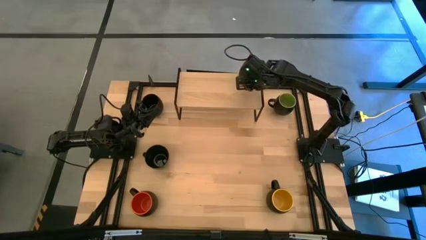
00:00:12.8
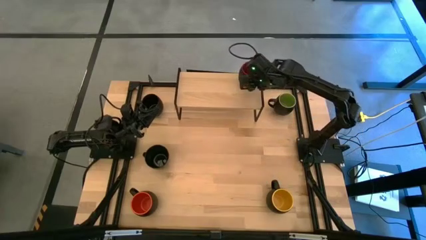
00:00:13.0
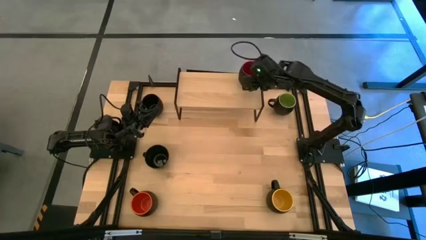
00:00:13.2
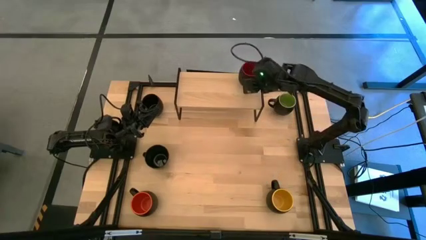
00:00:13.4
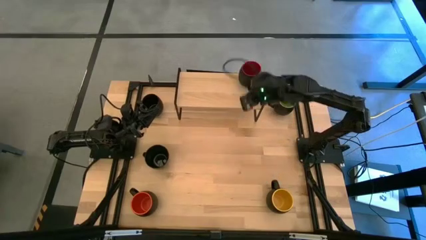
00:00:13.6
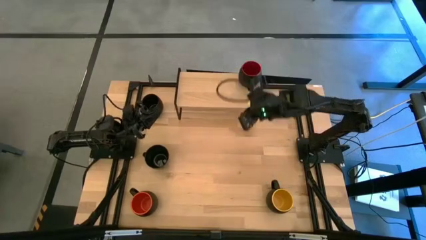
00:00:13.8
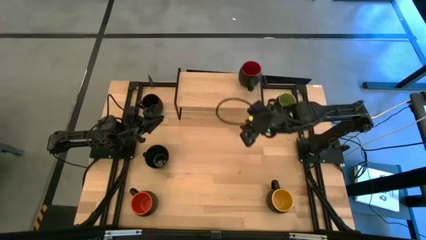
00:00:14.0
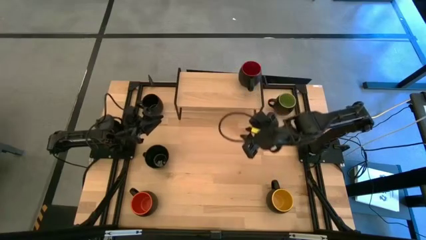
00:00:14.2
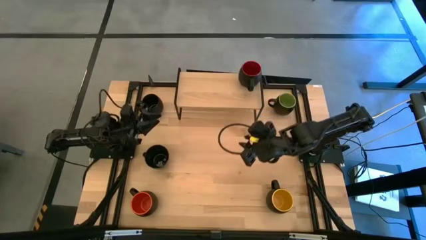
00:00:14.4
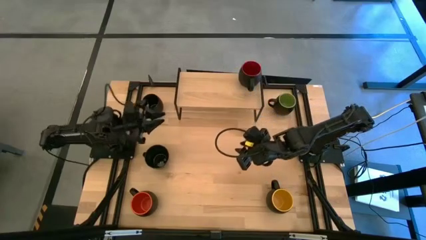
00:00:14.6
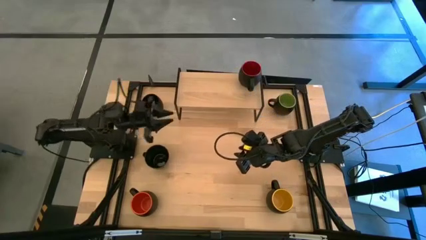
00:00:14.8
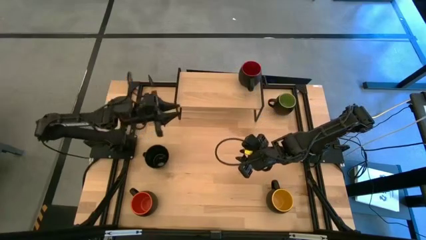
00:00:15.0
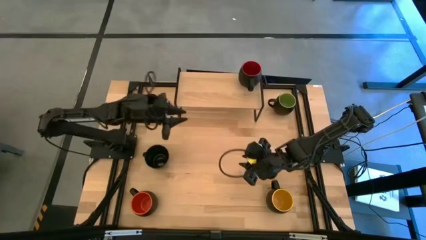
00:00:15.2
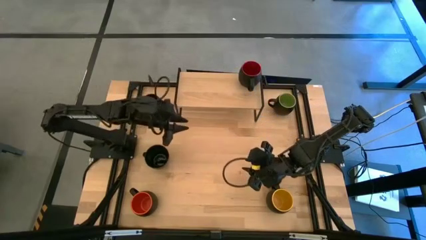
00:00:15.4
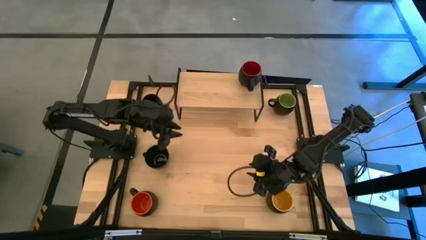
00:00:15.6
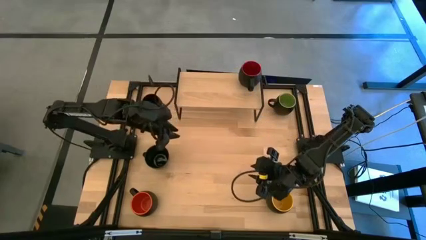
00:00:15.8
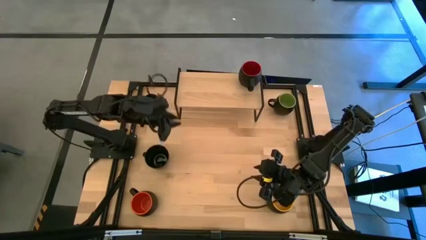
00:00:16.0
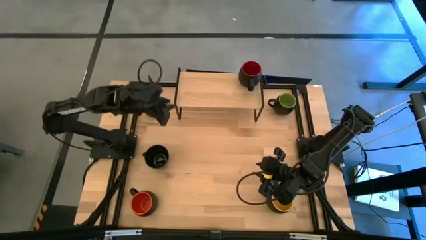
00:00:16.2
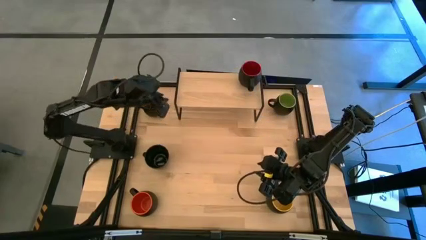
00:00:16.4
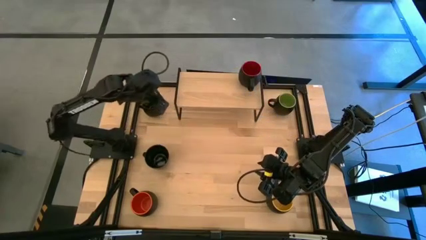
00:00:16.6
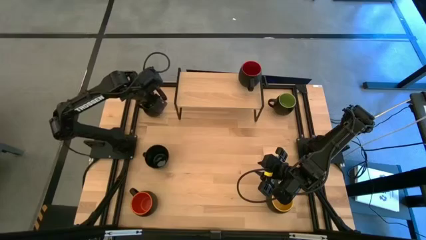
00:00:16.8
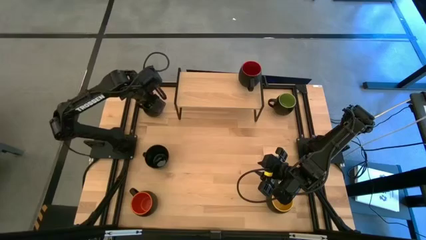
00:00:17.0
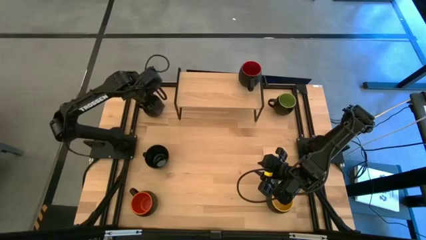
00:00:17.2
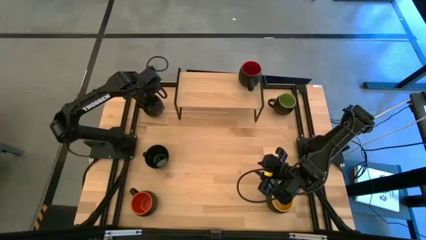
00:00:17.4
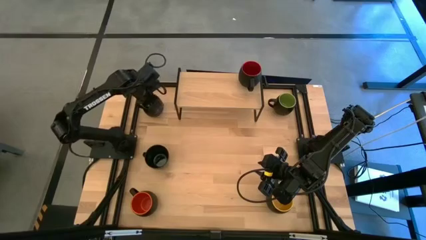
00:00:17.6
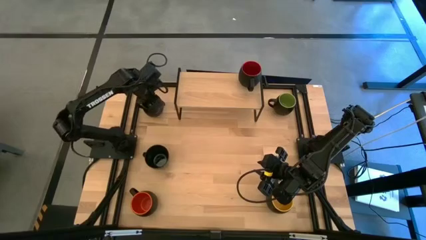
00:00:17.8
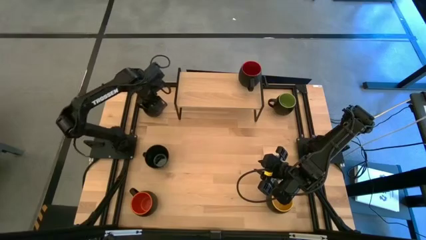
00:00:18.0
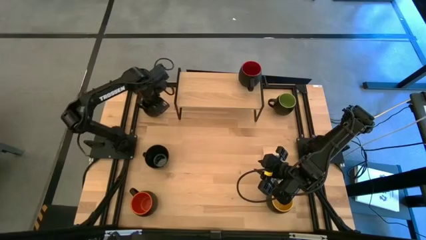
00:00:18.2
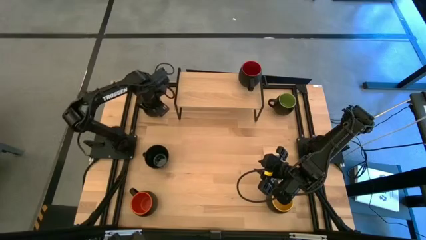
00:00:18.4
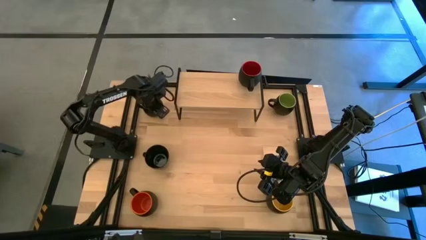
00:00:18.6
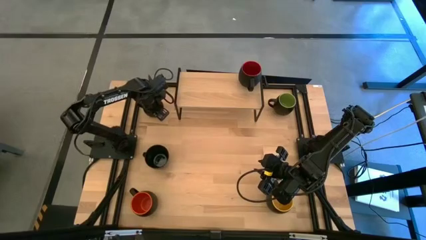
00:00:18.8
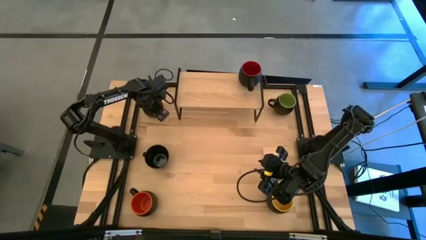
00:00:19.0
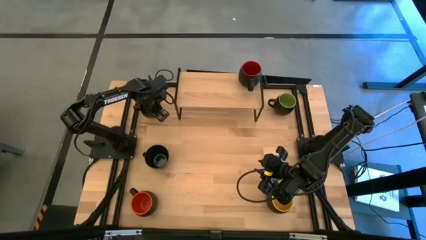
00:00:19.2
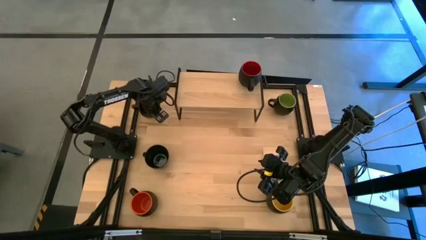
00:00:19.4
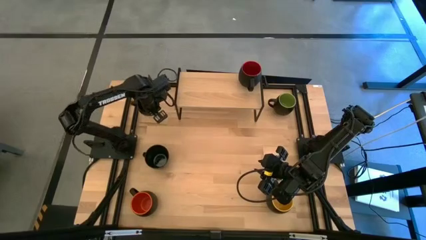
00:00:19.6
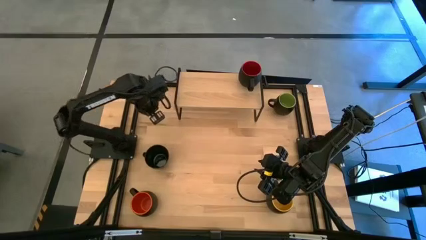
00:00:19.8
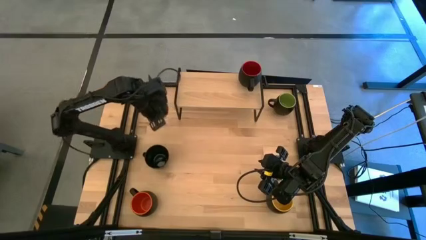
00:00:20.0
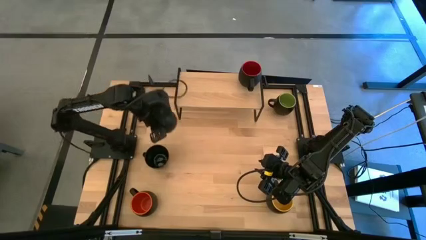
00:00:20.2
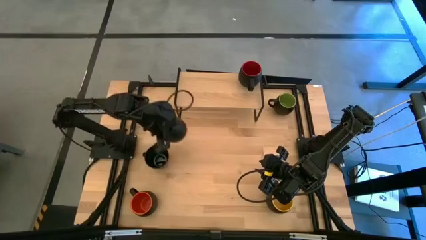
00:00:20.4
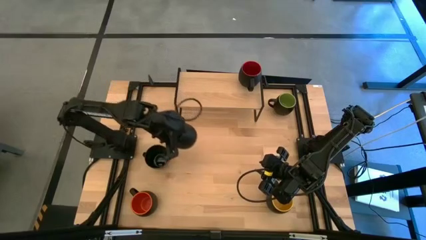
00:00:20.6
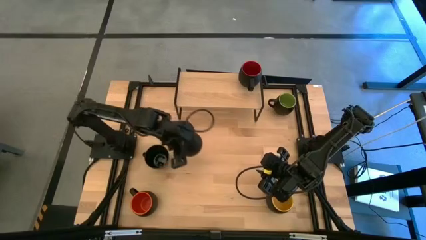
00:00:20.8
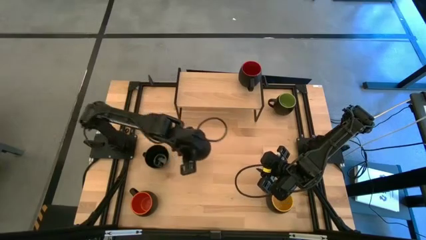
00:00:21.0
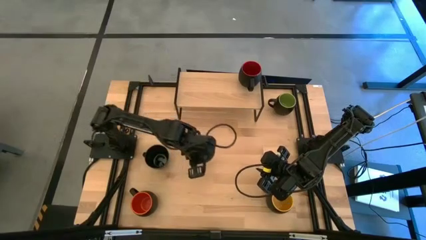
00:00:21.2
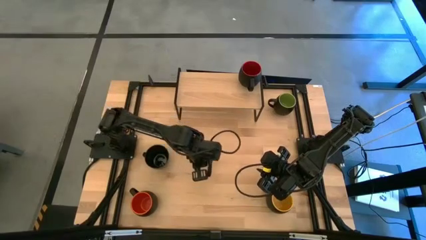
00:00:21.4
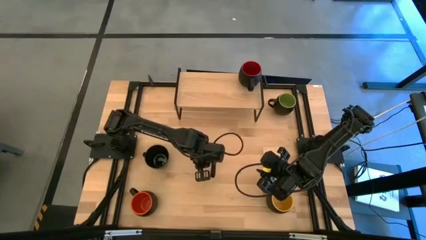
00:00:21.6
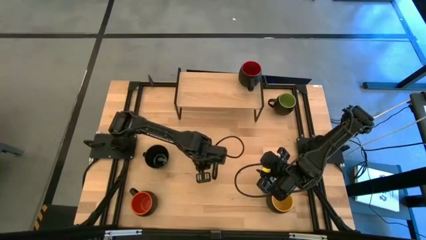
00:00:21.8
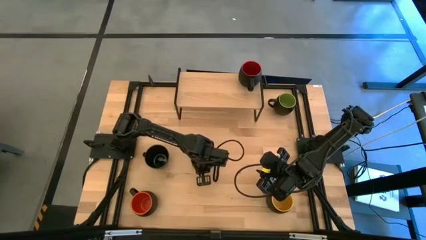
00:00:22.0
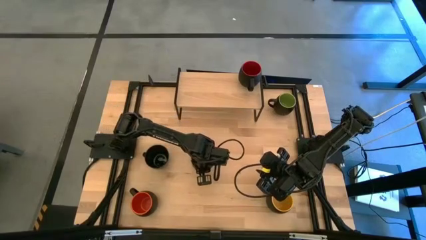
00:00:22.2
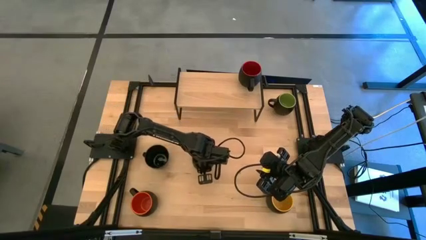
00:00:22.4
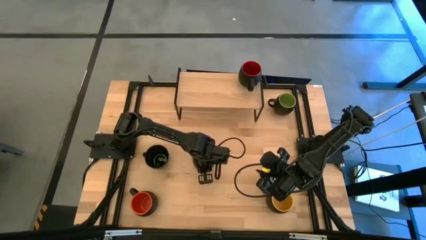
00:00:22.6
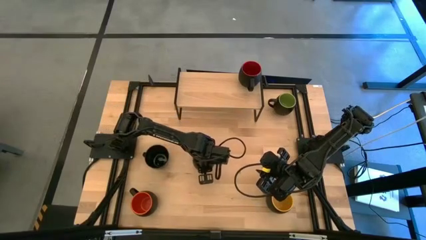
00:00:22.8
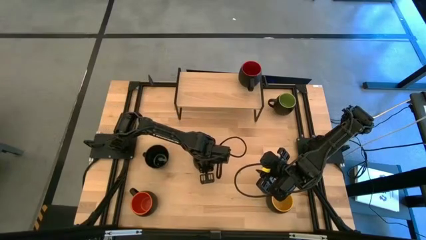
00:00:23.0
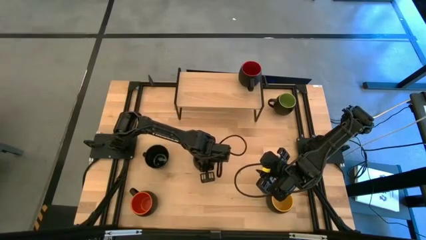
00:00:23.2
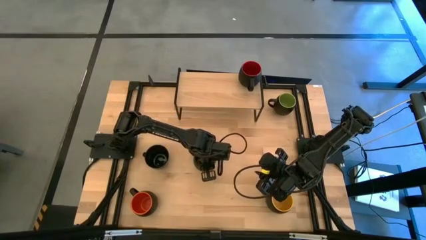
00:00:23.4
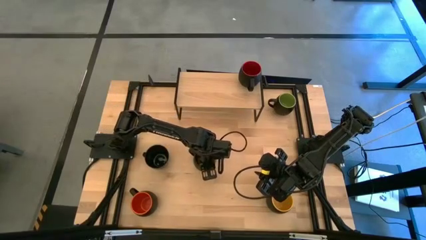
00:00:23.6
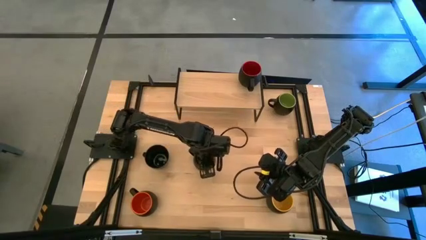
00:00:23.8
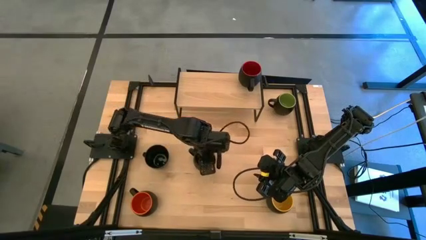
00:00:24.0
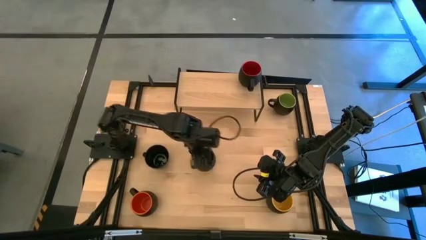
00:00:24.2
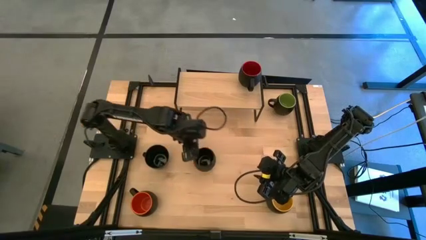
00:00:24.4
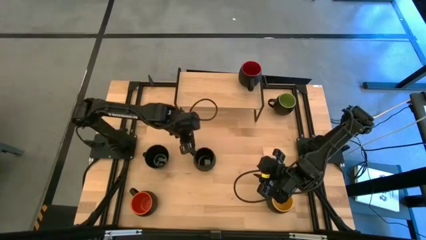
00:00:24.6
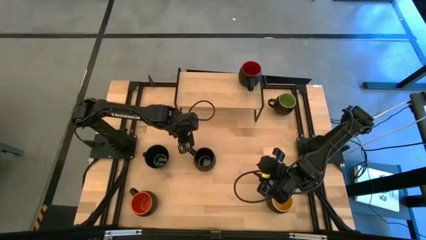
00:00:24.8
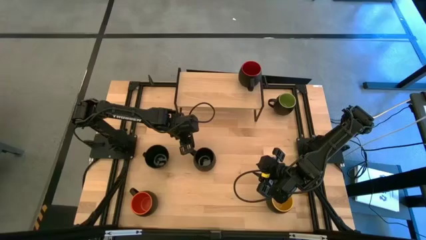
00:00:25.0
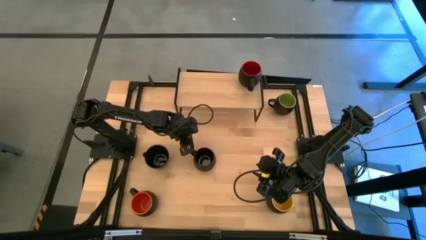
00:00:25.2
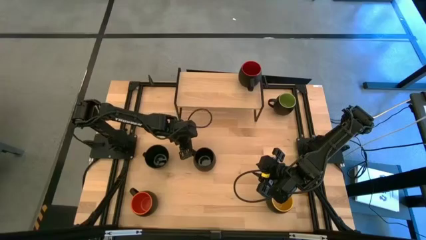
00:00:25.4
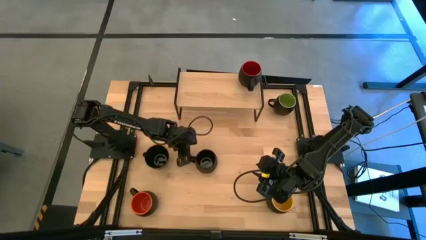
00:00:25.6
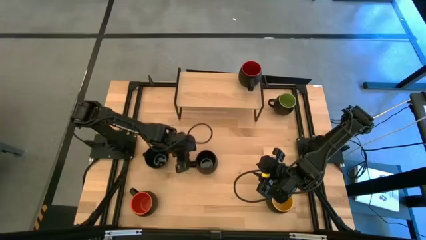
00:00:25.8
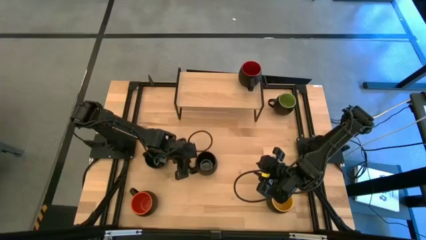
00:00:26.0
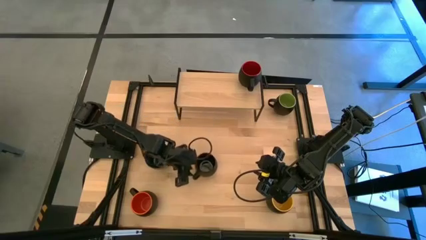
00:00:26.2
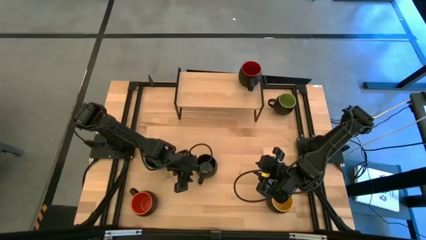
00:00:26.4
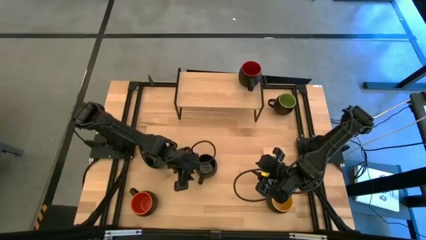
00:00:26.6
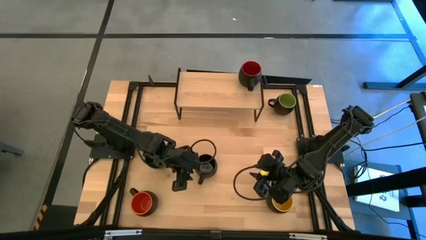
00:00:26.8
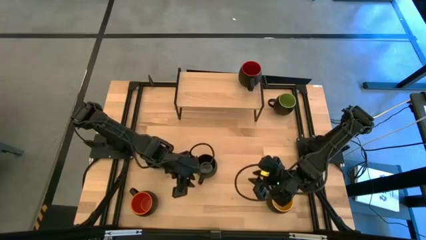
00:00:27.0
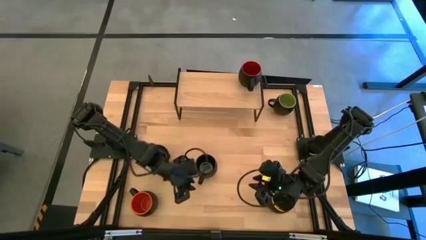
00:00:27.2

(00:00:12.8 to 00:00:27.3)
Task: Place coffee mugs
Put the black mug on the shelf
